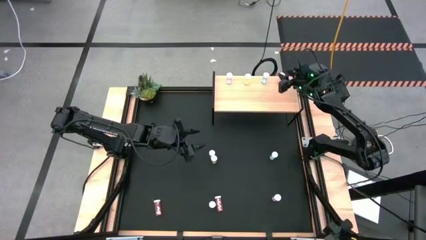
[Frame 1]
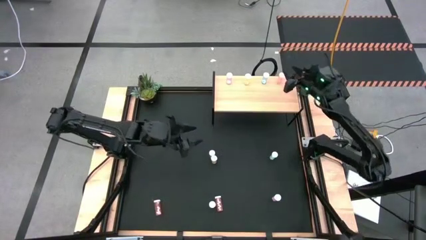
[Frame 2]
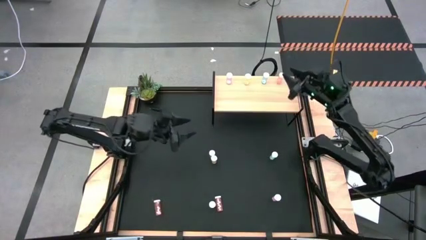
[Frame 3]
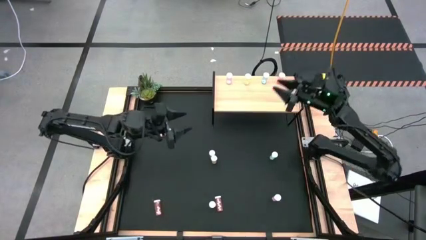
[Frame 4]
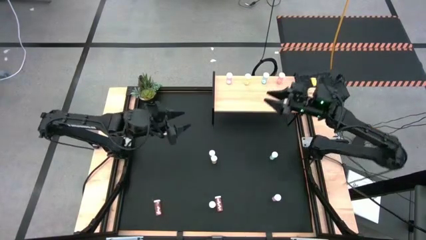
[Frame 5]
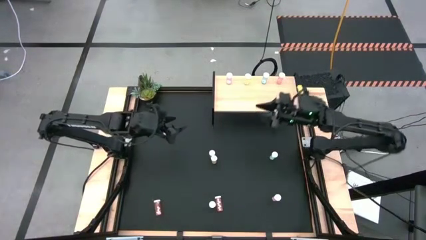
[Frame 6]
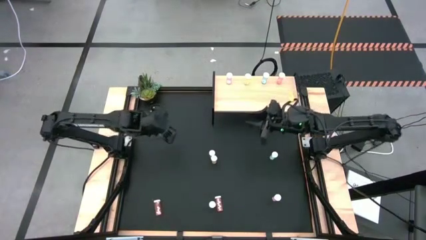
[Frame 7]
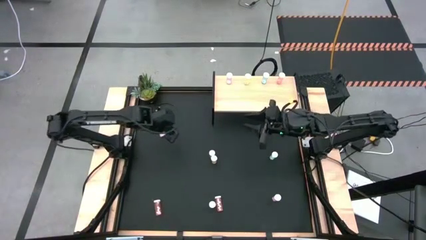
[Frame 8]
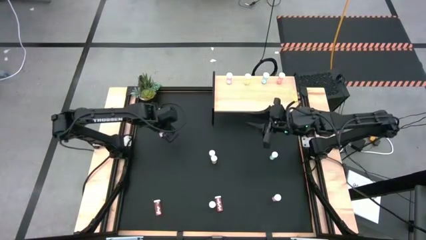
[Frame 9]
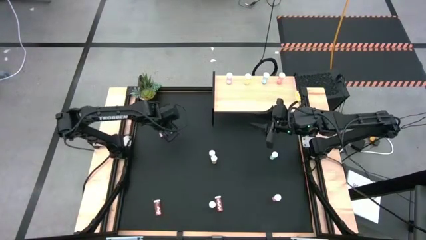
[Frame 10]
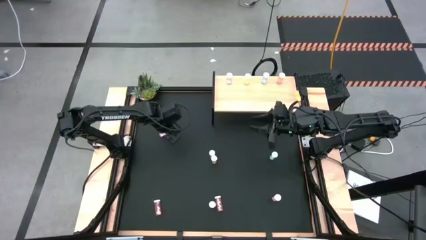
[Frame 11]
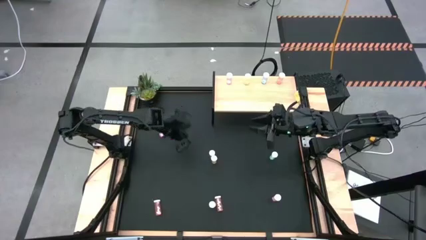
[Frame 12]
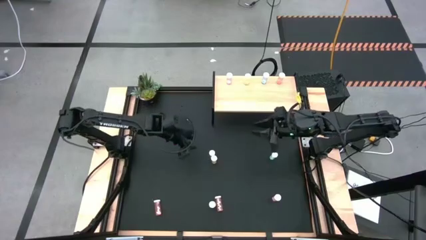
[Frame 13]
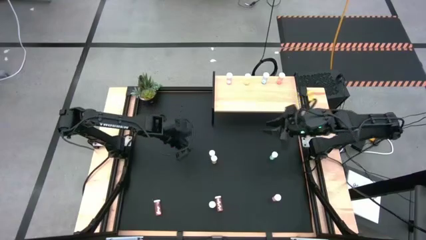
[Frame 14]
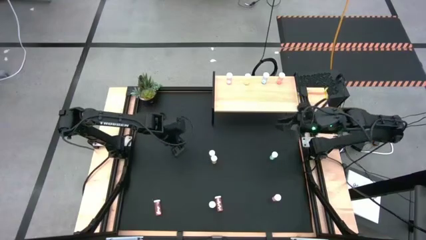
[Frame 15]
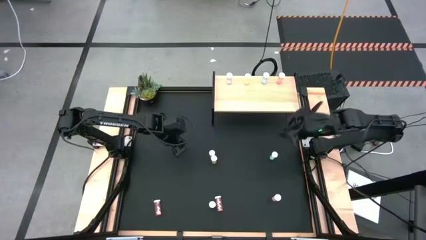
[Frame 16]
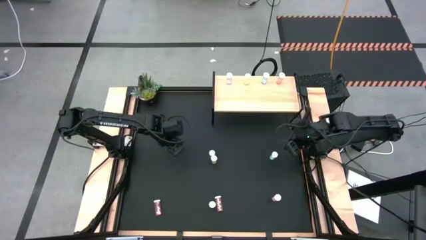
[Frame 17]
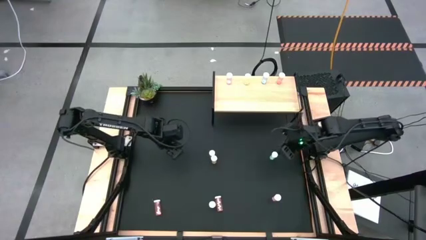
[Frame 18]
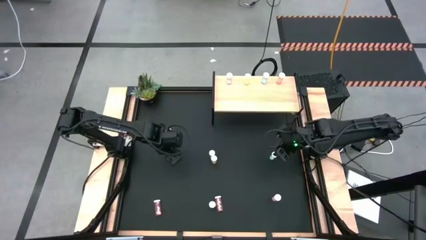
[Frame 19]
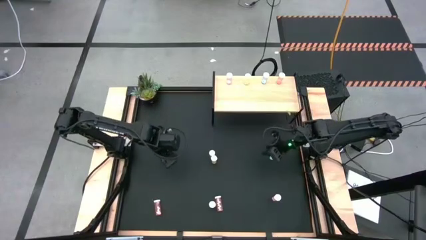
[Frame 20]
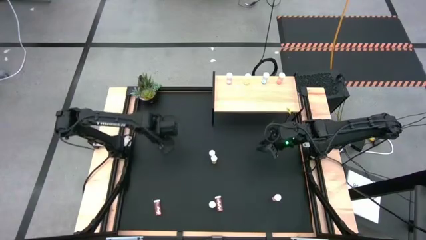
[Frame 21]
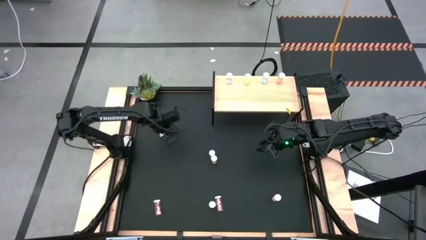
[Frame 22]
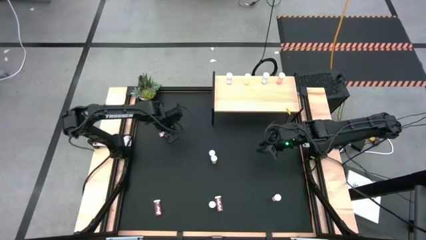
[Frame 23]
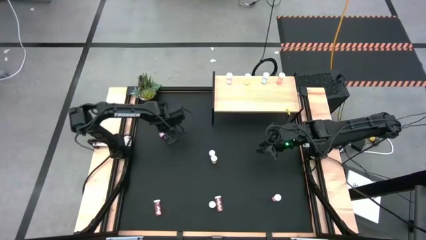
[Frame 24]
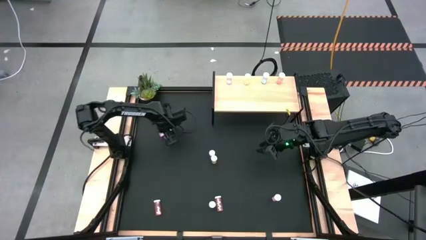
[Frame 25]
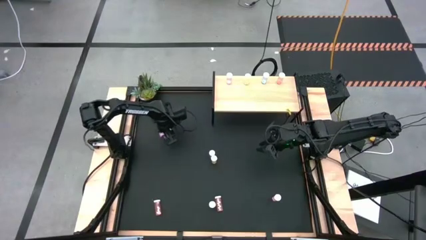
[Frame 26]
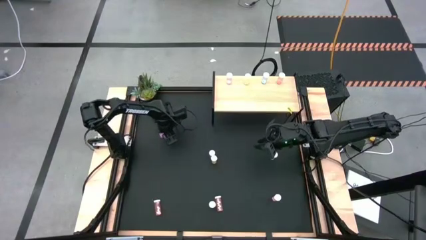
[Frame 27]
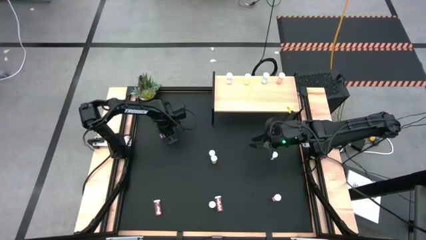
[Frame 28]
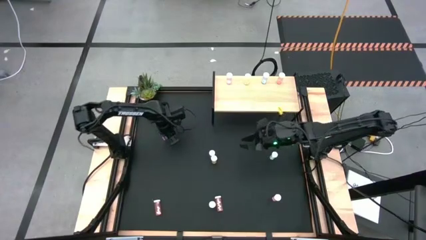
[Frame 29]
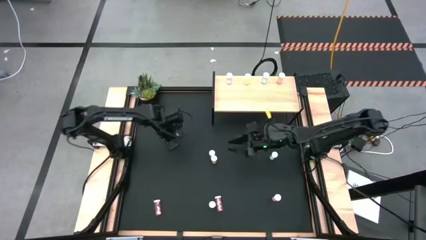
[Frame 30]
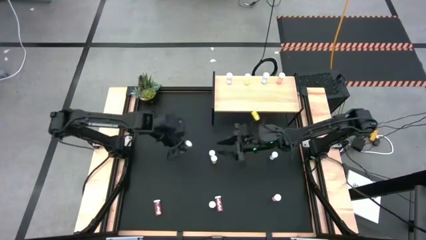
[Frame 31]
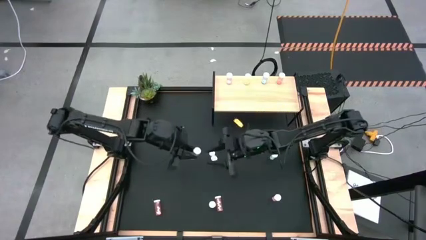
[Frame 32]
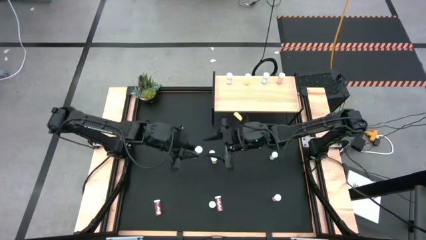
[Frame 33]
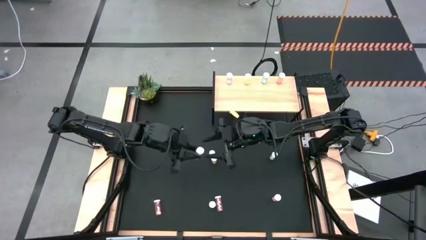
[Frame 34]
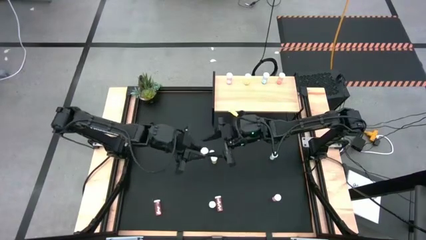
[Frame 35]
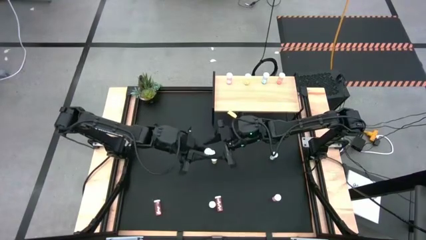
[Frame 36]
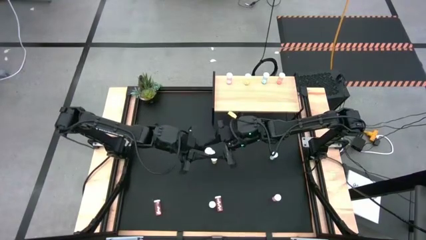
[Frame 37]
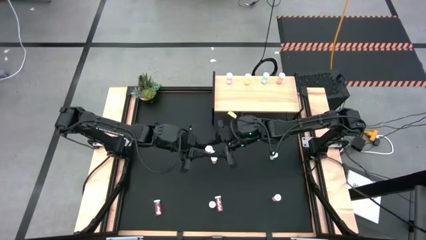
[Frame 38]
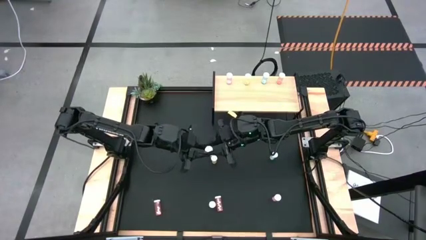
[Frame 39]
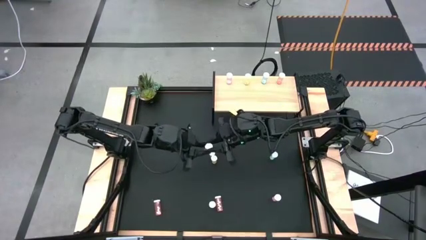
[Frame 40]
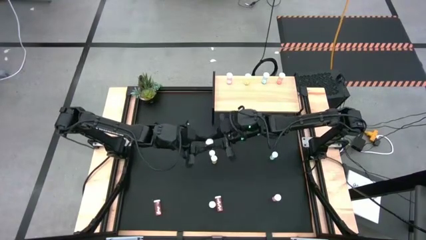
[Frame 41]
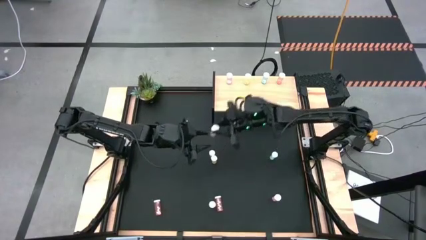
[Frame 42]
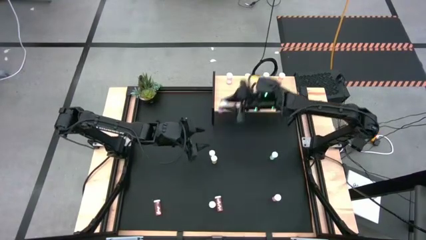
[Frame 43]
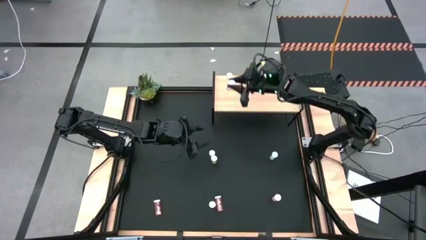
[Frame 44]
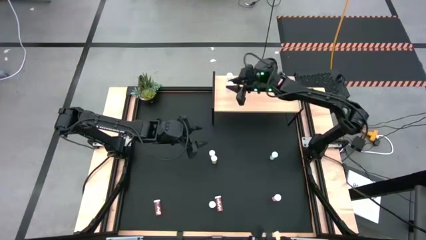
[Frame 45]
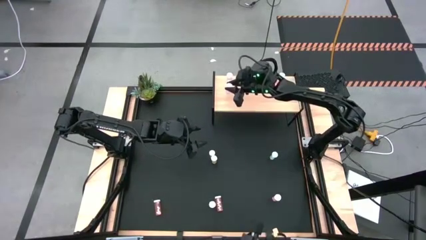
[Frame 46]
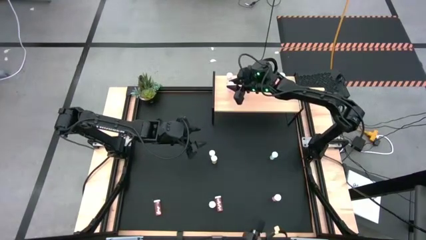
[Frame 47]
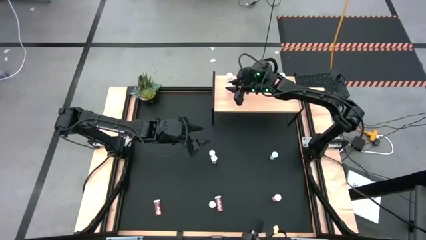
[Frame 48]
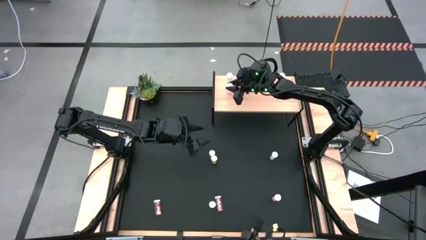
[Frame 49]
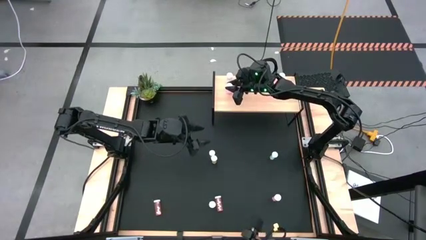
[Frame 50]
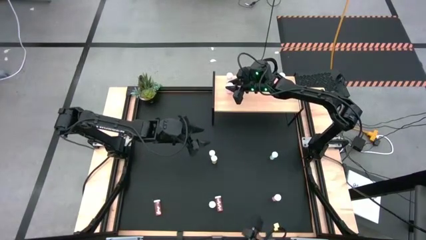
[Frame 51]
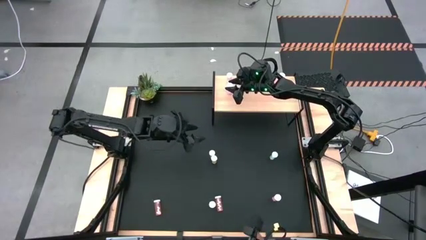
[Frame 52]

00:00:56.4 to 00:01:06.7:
Task: Pick and place medicine bottles onto shelf by color
Put the top left violet pill bottle on the shelf aligned with the other violet pill bottle

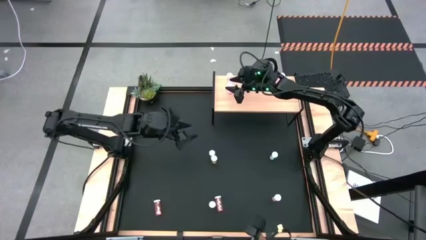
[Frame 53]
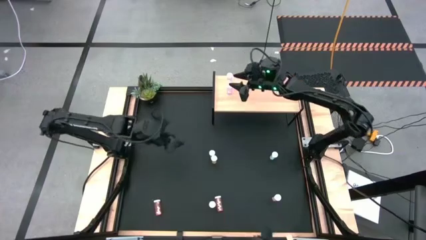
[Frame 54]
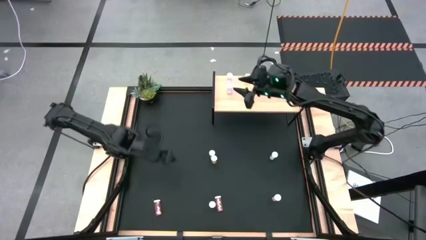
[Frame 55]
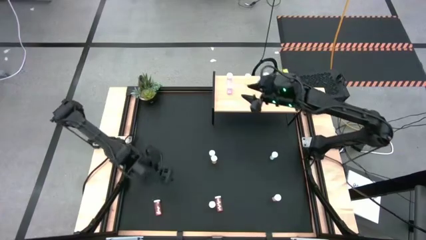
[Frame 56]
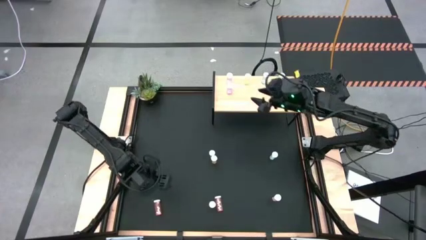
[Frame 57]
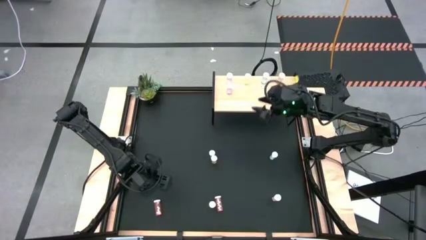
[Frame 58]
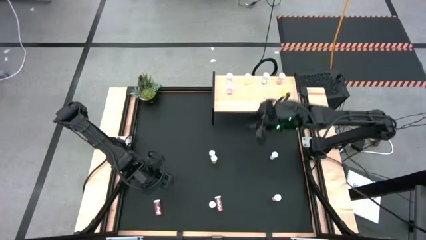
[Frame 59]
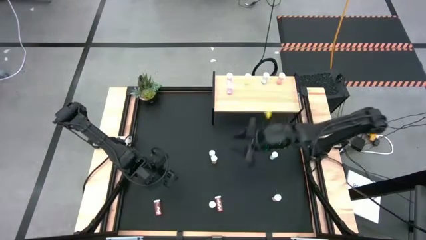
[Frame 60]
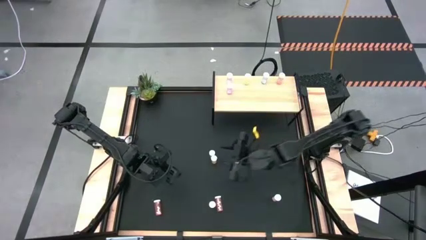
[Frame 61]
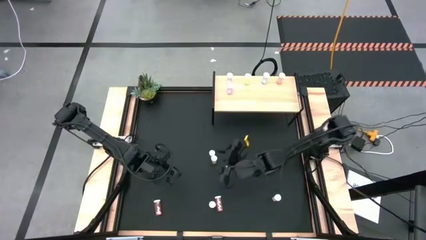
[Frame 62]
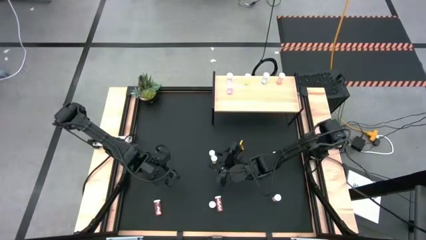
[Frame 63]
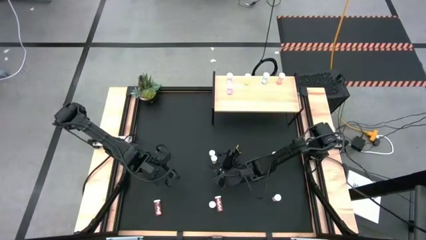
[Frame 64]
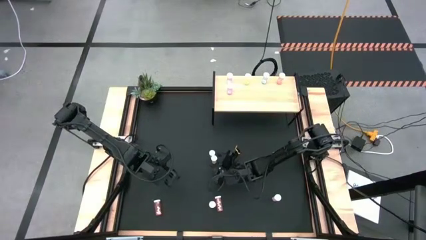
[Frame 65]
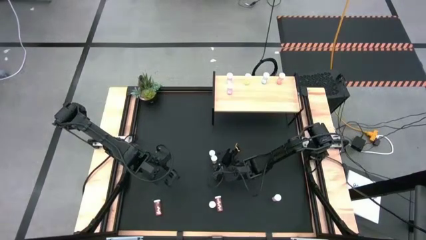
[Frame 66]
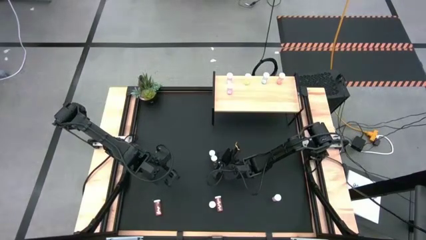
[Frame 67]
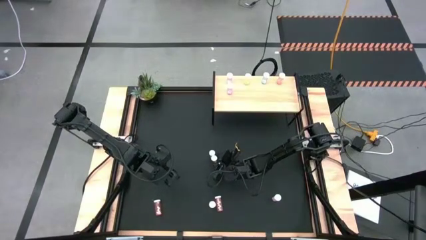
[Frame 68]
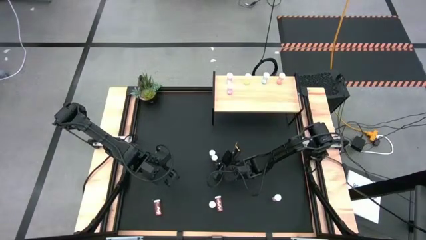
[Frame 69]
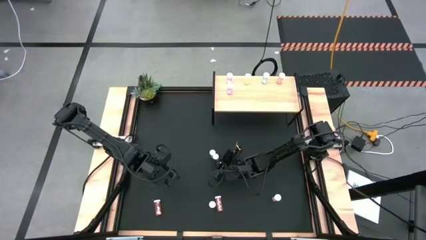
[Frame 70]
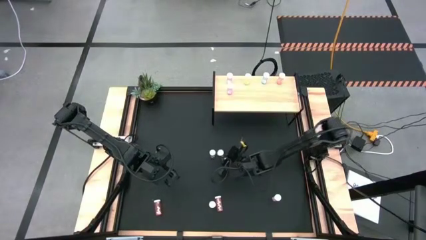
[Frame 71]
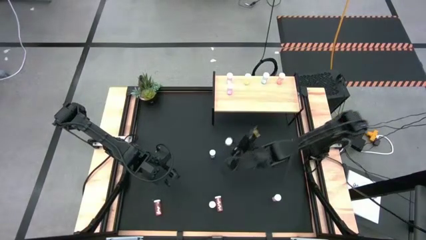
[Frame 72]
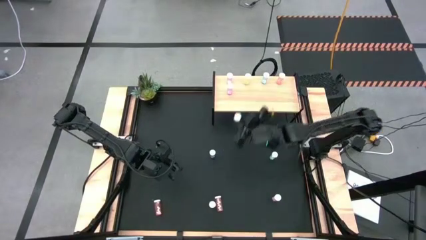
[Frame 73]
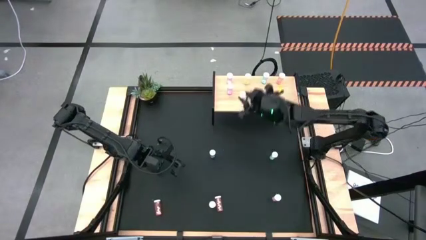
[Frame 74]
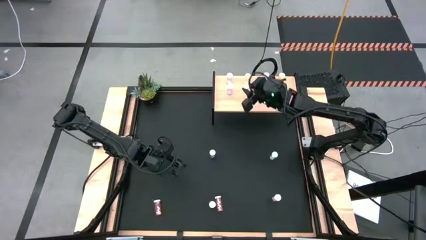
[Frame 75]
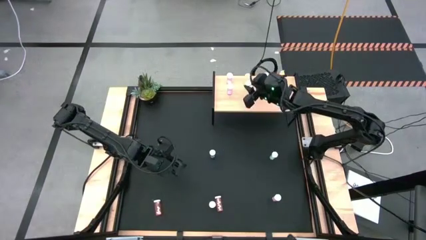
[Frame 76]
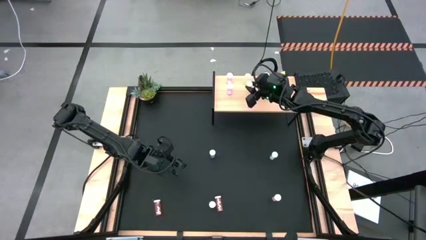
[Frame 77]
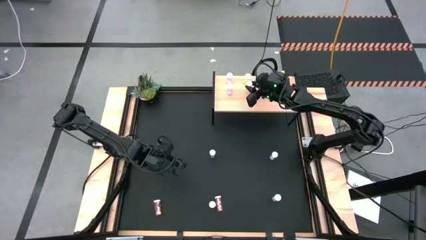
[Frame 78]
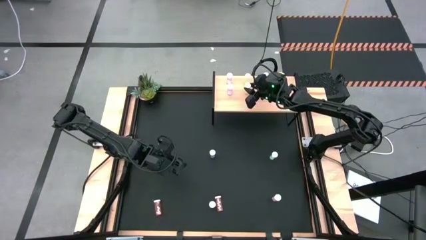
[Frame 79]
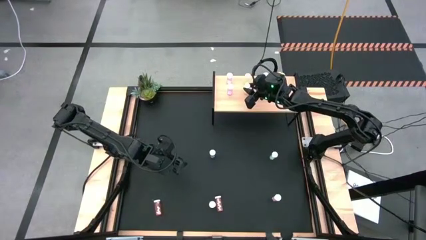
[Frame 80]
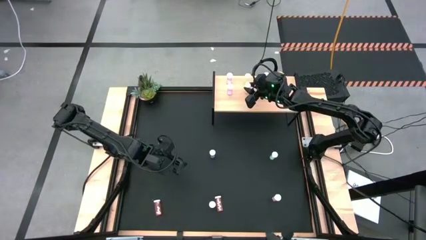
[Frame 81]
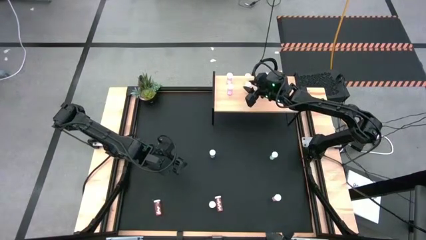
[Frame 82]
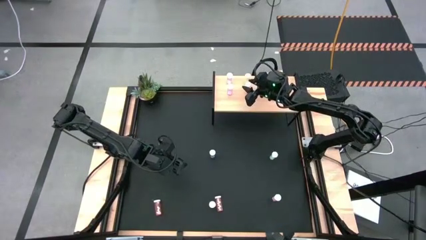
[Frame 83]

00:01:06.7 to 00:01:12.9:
Put the top yellow pill bottle on the shelf aligned with the other yellow pill bottle
